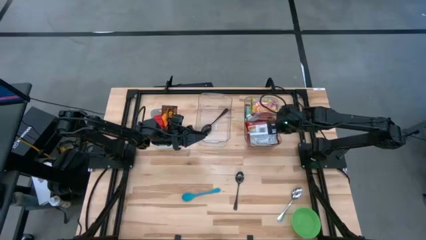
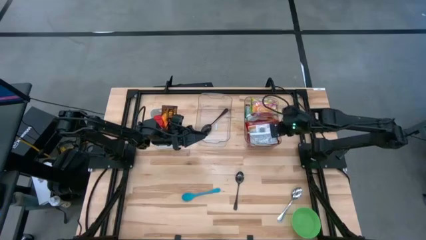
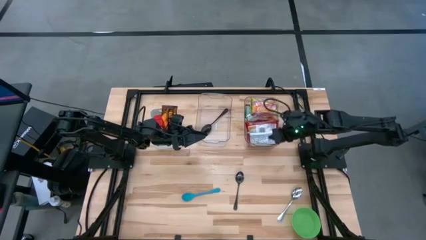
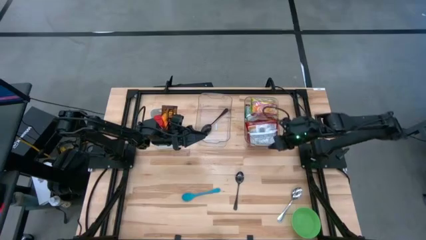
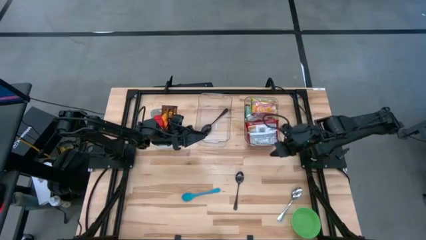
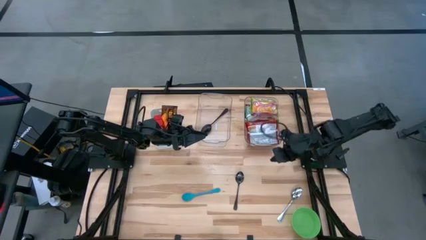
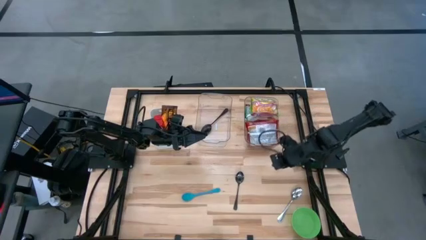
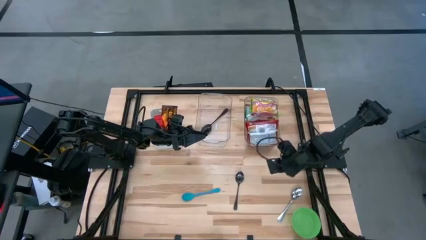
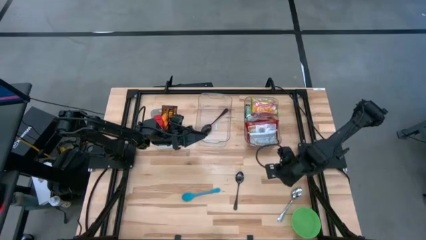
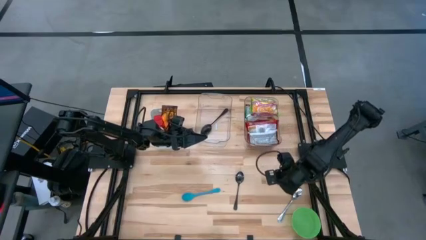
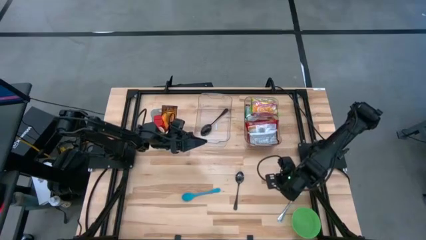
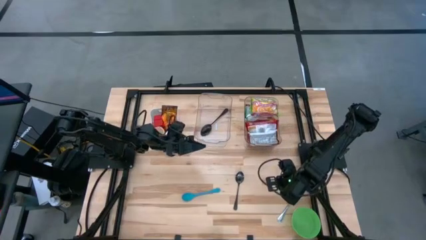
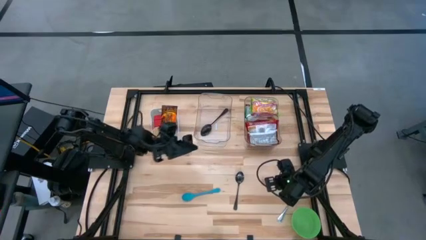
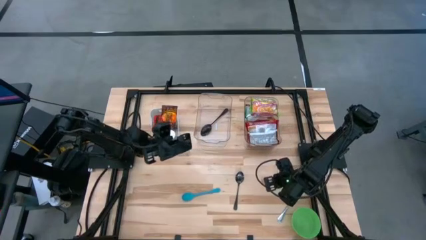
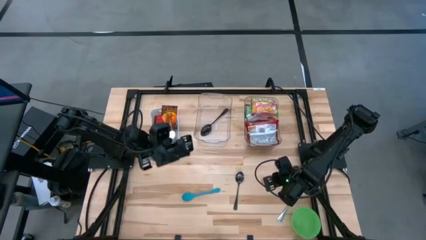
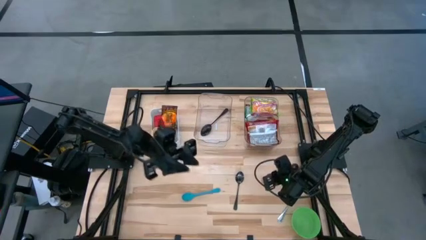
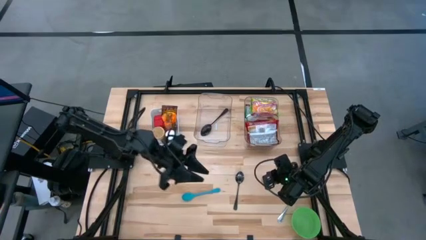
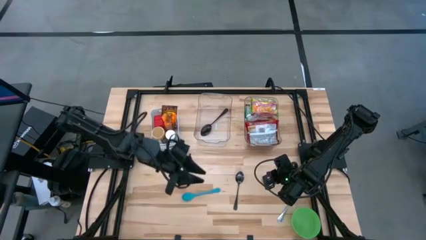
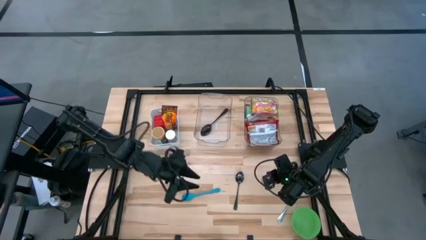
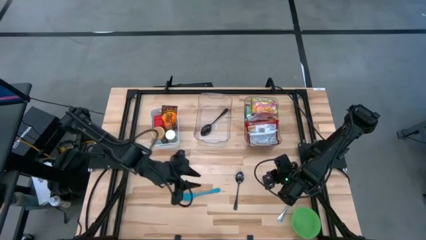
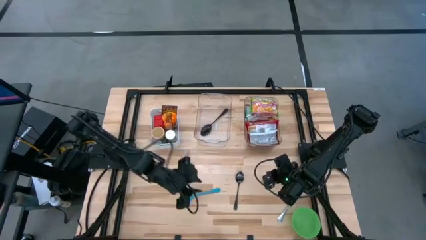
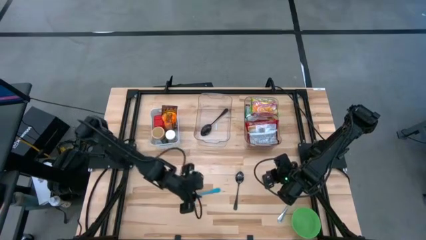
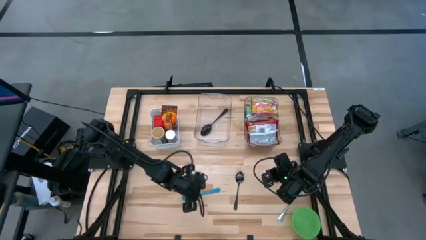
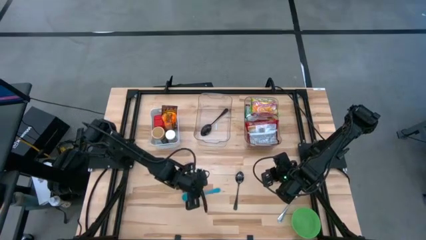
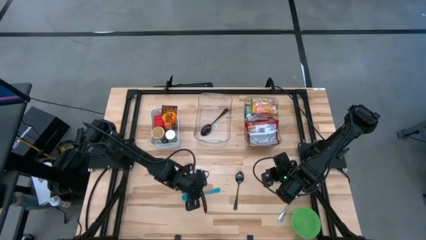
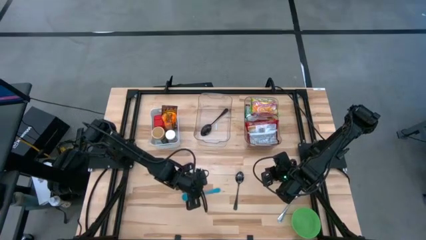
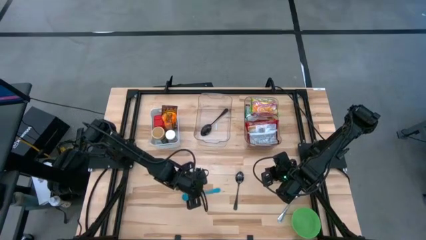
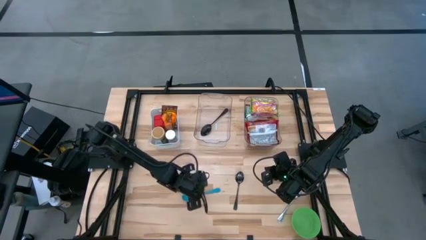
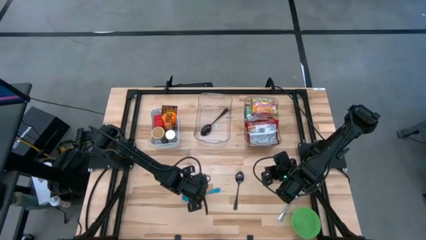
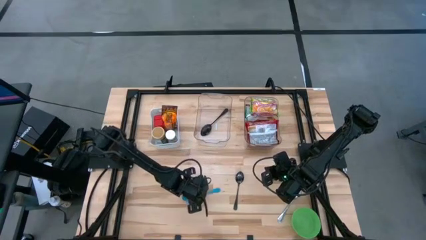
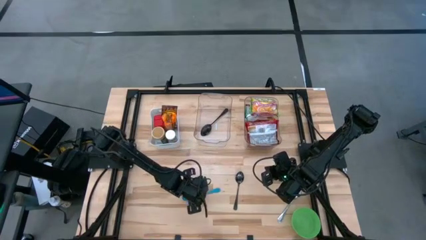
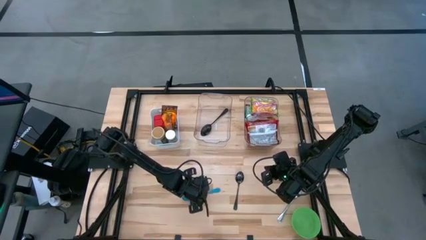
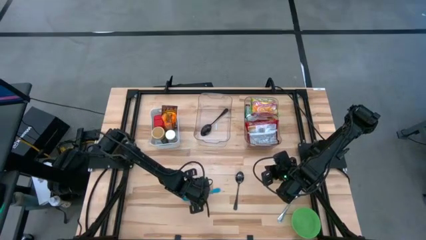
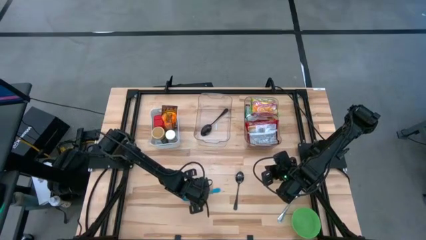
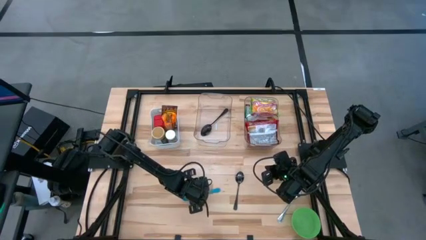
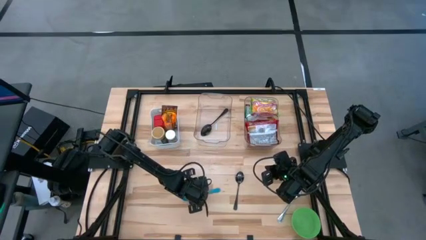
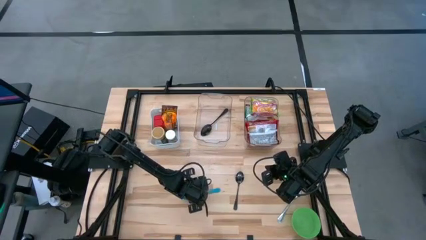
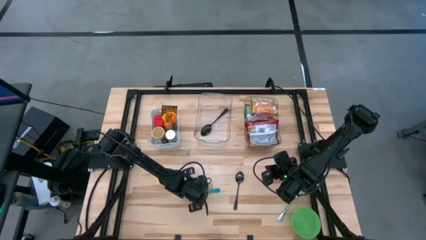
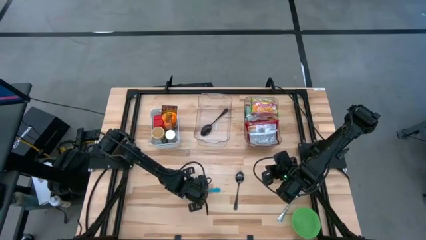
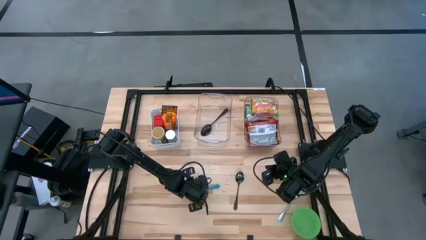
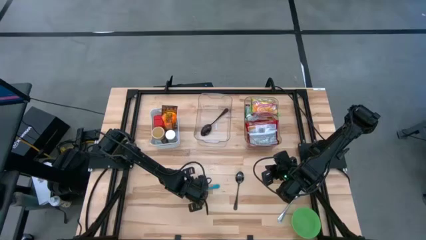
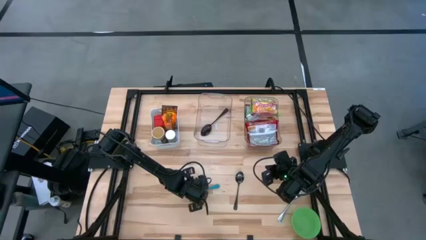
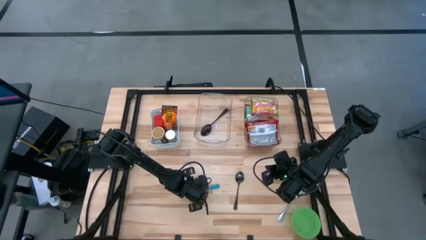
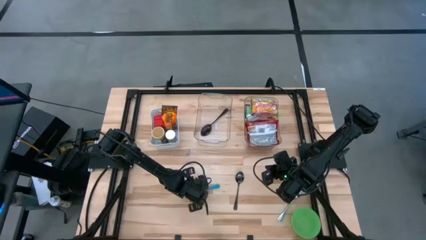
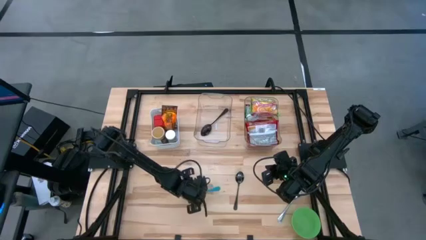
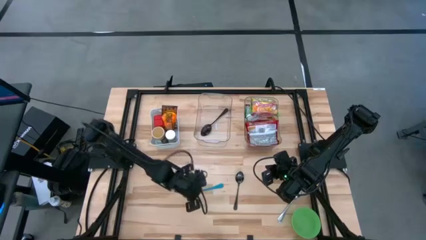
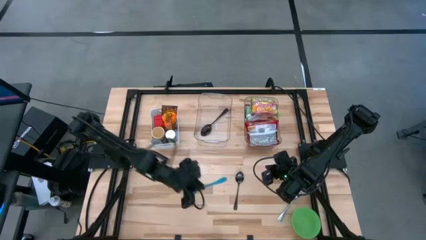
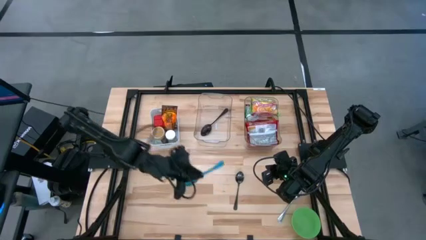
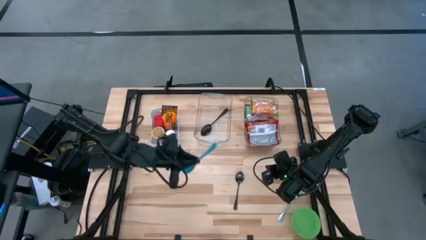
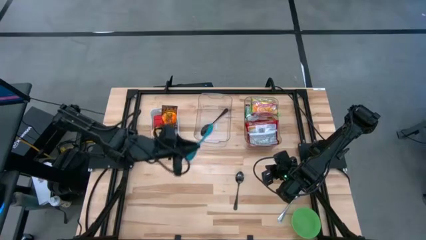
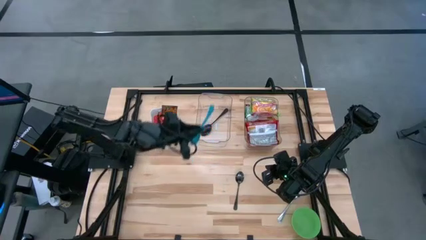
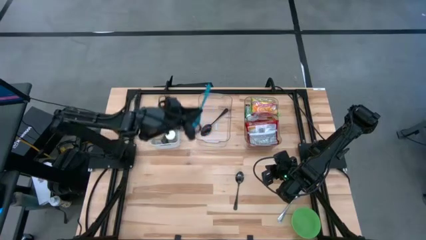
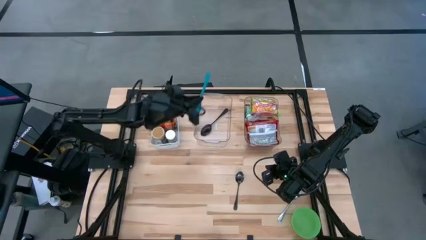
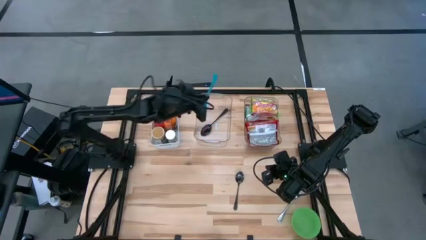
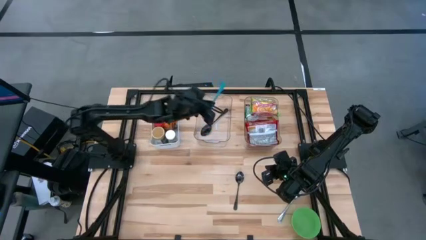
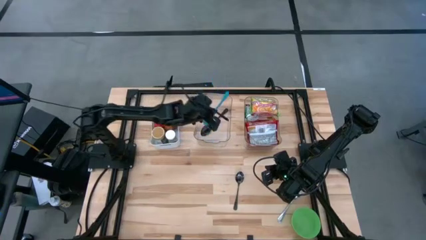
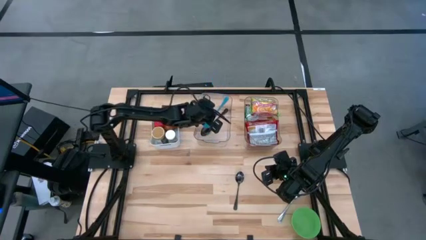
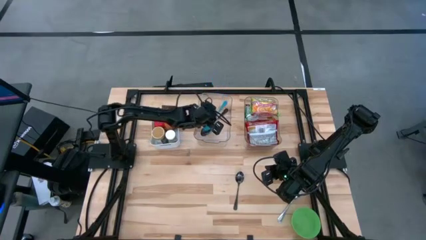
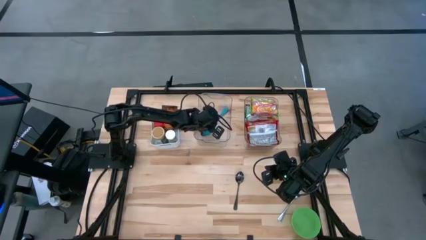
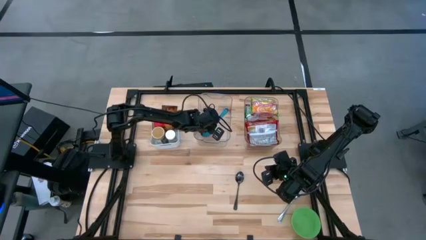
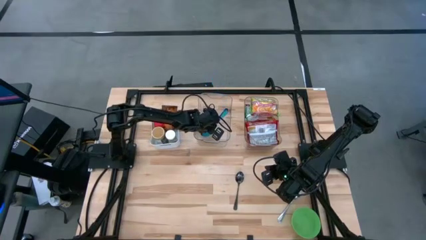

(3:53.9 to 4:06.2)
Task: Pick & Place Food Item
Put the blue baby spoon into the left transparent bin
